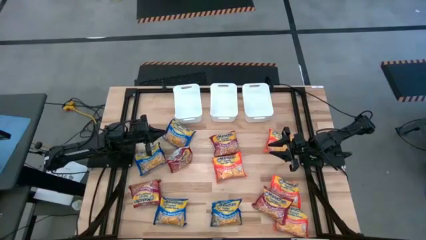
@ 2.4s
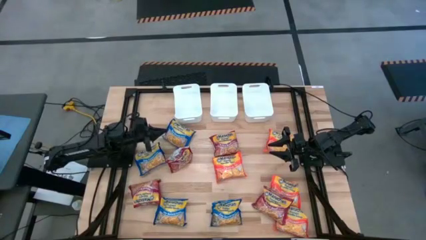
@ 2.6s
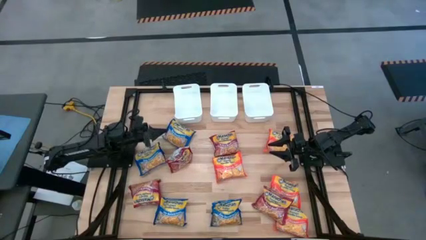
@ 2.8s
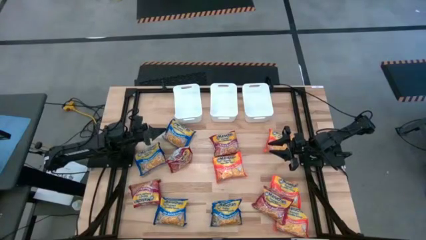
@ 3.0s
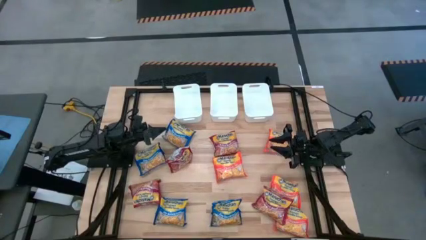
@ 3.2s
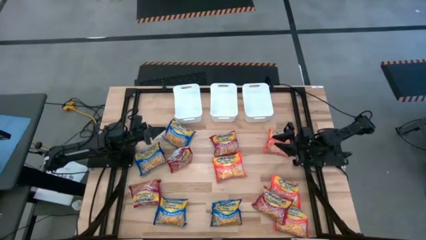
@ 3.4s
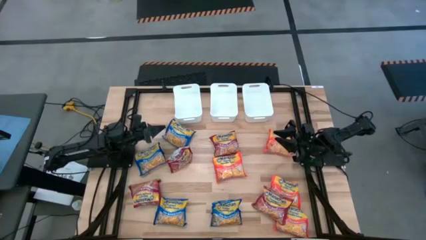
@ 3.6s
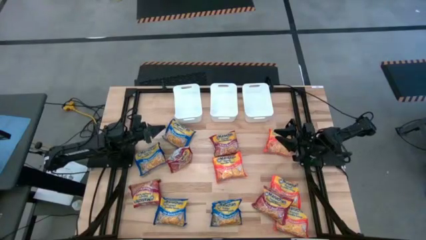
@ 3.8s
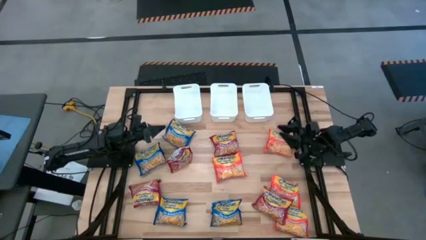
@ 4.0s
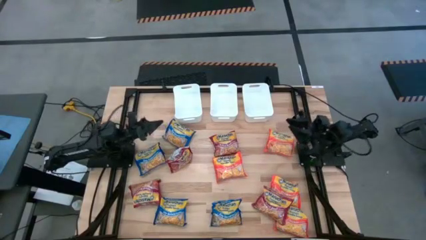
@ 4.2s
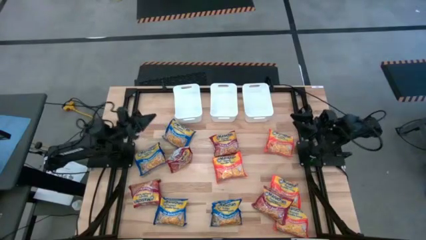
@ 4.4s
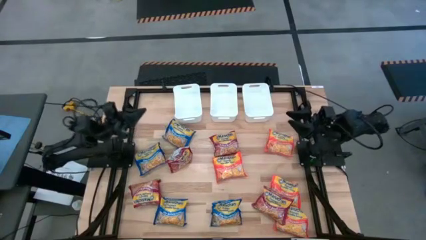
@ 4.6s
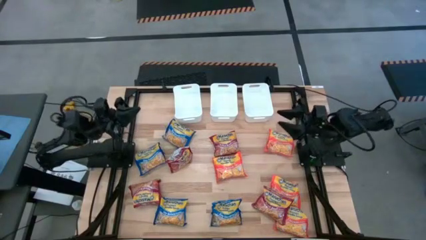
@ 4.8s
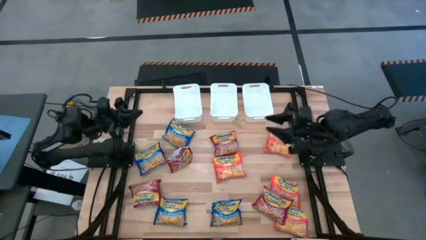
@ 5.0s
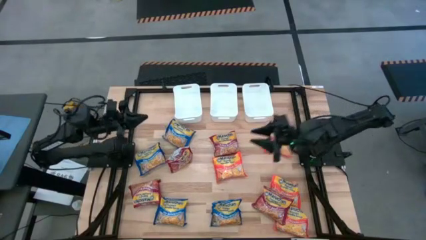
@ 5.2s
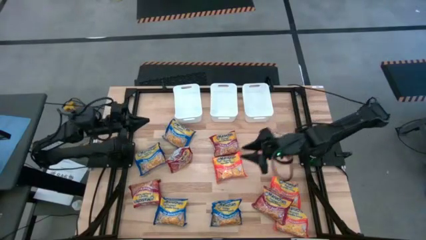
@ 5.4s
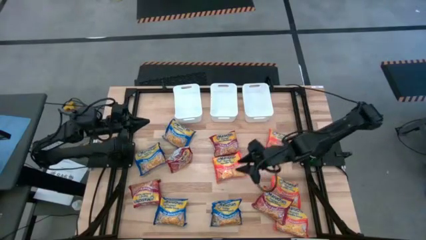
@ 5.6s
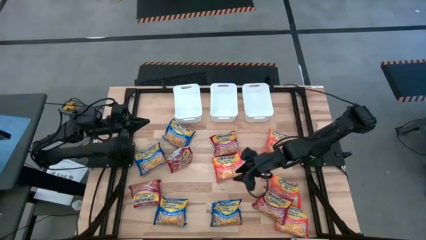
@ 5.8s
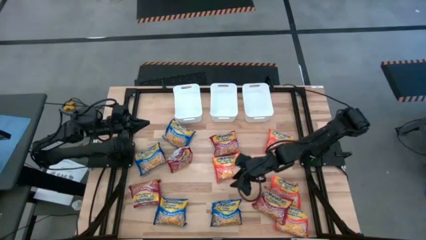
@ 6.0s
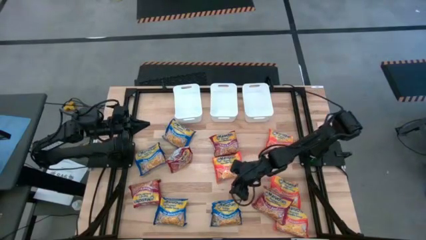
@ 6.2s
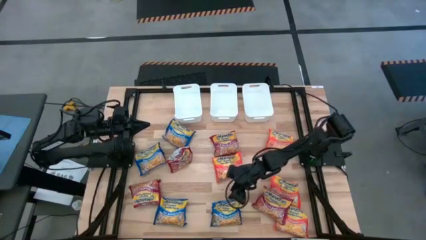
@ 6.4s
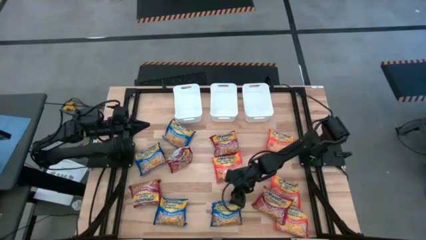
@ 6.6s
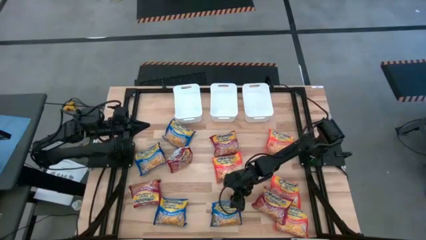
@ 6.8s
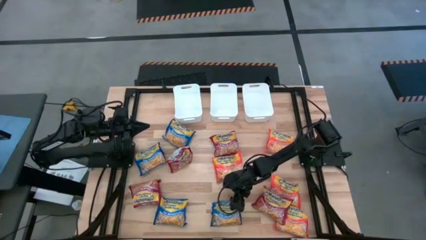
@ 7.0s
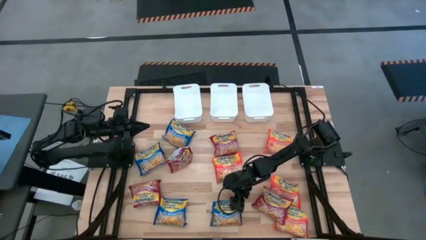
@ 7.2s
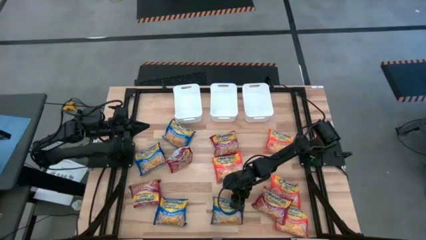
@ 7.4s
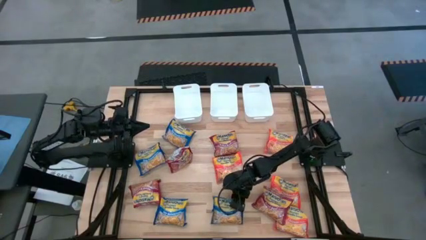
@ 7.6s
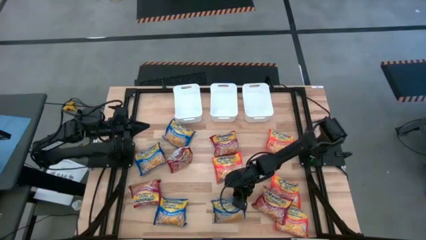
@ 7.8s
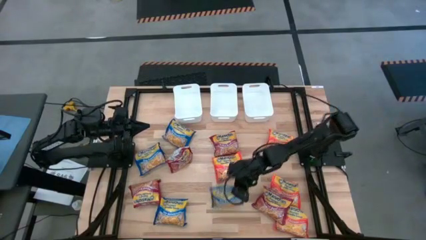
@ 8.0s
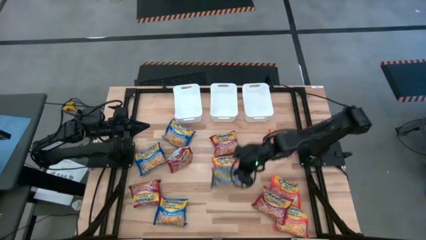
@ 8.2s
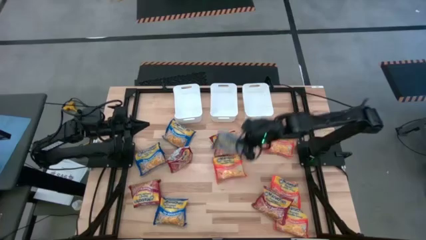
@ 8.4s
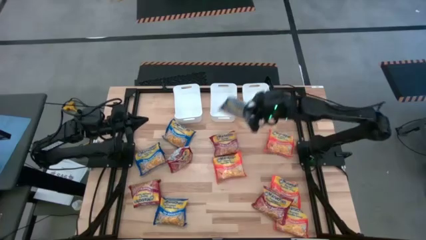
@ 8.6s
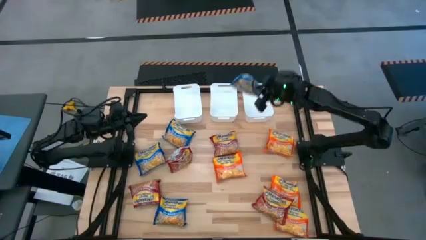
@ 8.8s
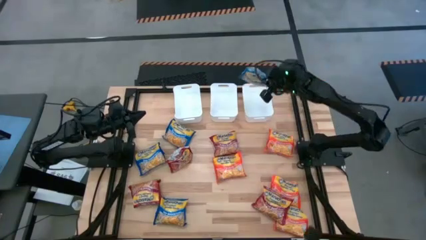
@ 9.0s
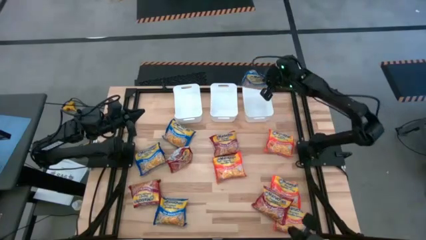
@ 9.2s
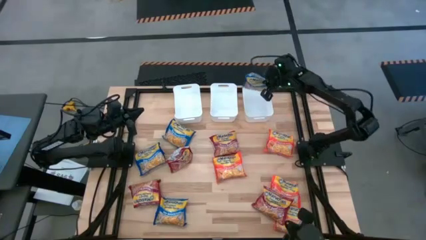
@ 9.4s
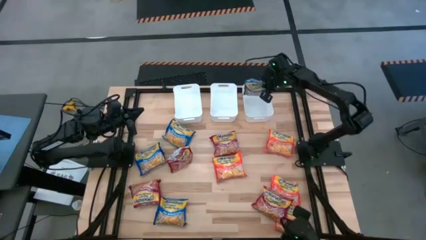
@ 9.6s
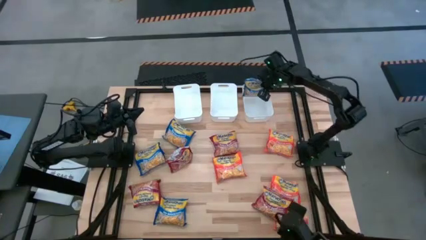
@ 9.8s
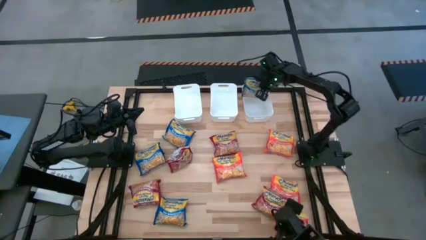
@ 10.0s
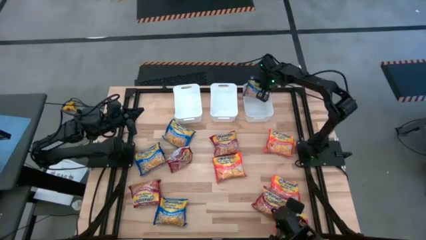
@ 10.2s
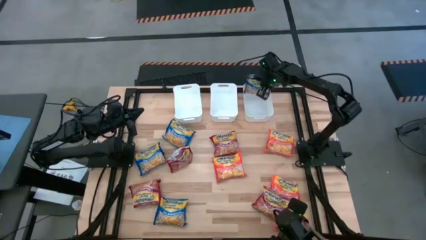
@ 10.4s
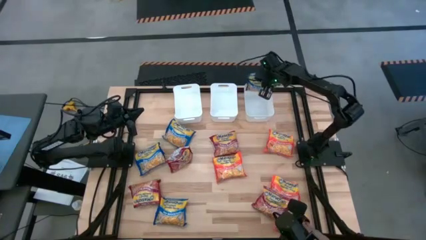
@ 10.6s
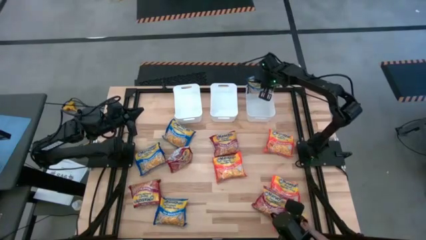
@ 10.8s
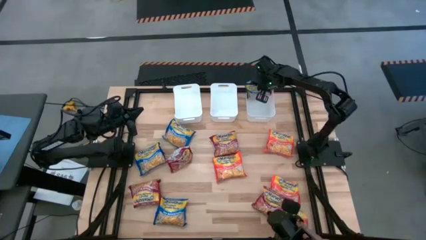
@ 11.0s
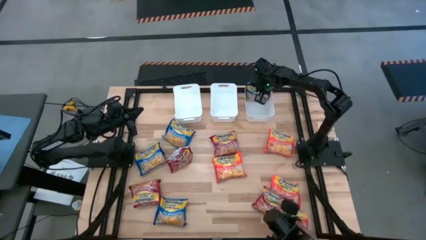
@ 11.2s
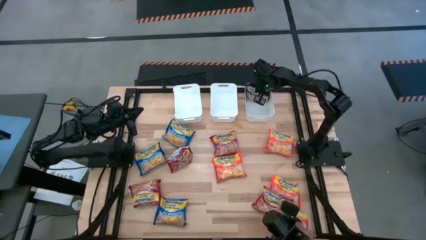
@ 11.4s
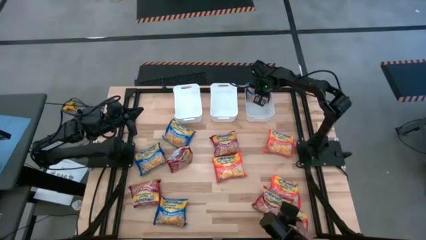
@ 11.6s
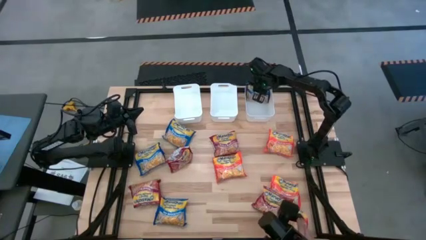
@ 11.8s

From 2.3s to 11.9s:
Task: Sort Maruchan noodles
Put the blue noodle pack into the right white bin

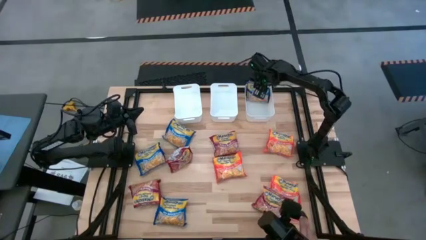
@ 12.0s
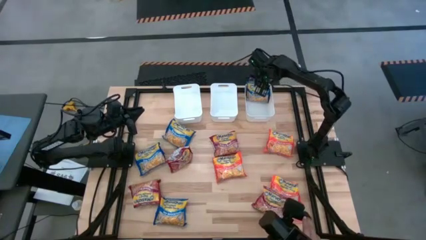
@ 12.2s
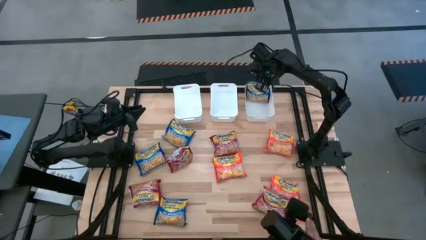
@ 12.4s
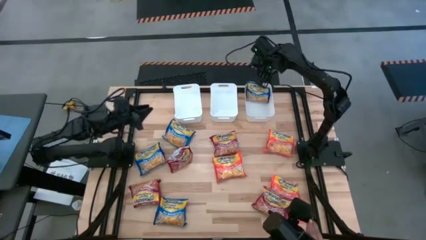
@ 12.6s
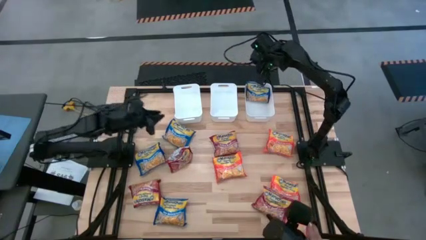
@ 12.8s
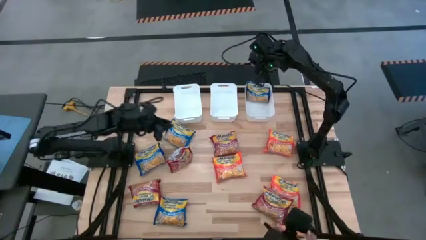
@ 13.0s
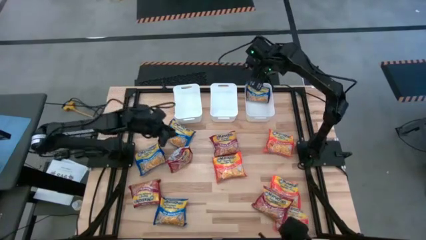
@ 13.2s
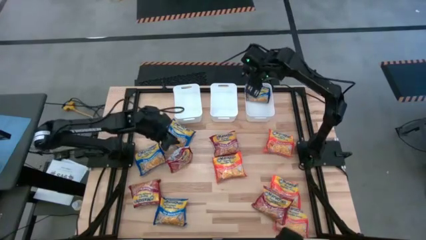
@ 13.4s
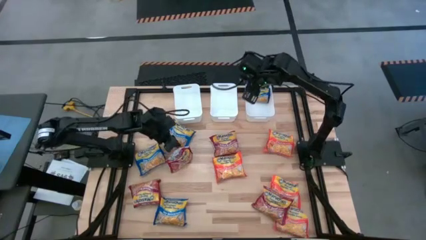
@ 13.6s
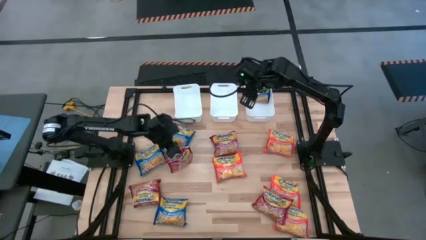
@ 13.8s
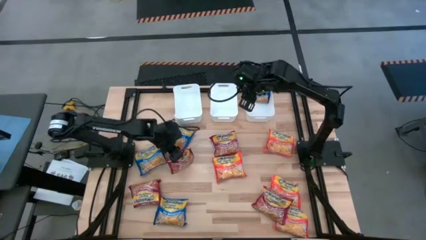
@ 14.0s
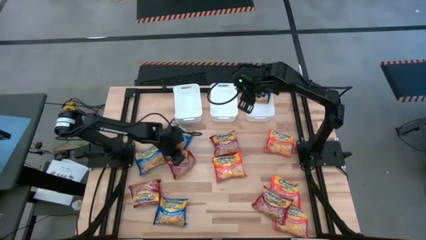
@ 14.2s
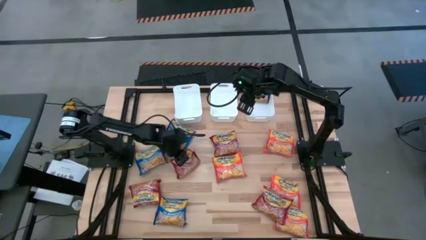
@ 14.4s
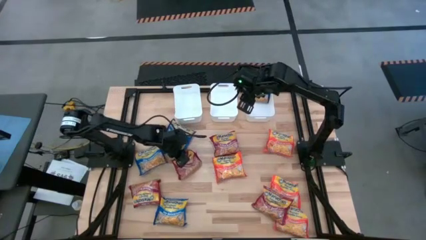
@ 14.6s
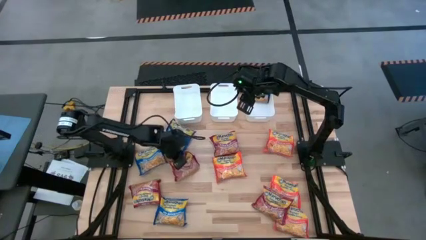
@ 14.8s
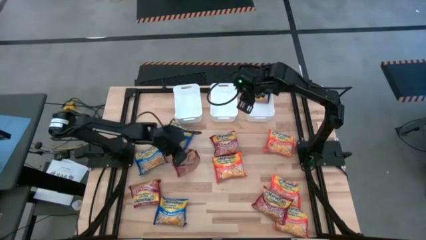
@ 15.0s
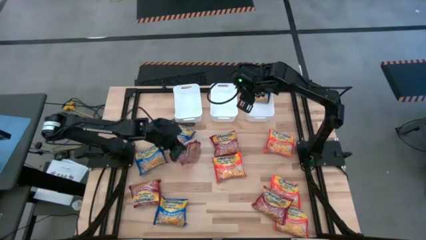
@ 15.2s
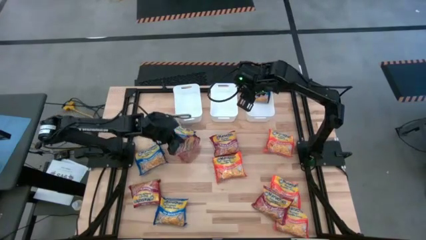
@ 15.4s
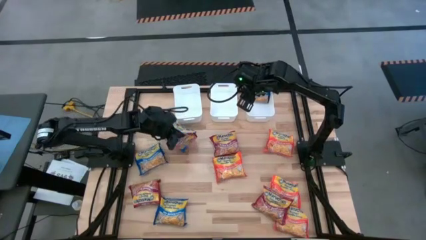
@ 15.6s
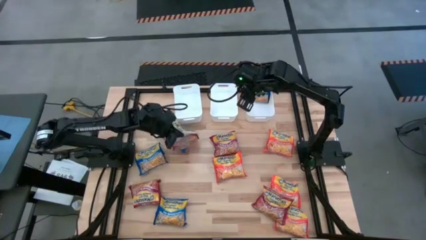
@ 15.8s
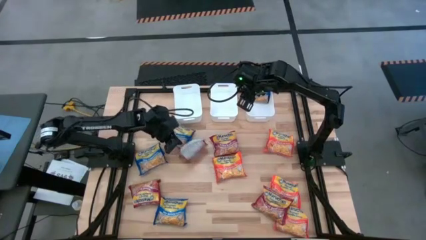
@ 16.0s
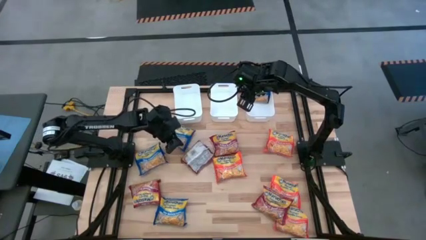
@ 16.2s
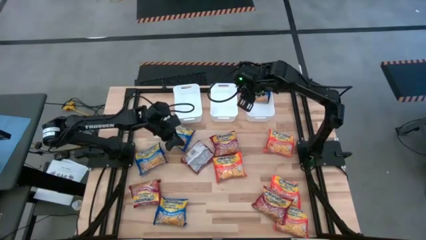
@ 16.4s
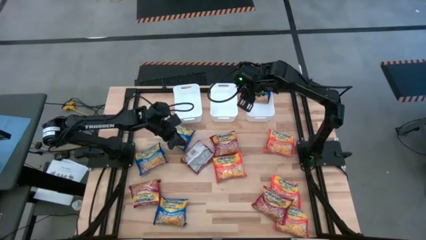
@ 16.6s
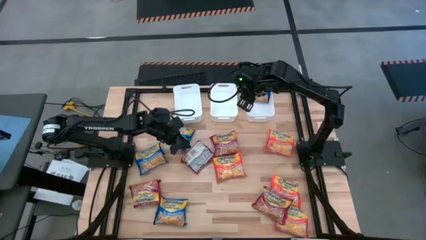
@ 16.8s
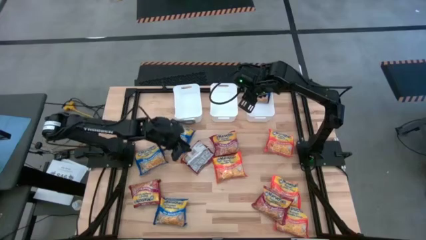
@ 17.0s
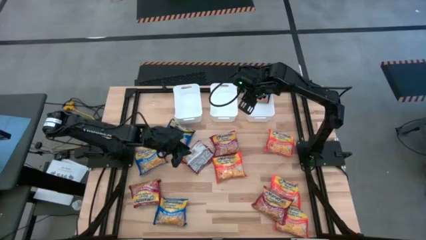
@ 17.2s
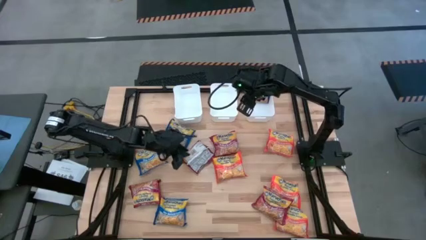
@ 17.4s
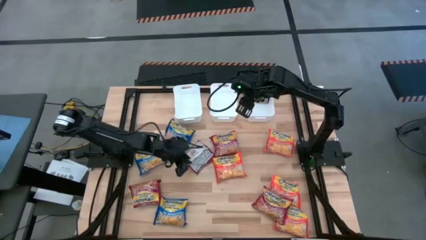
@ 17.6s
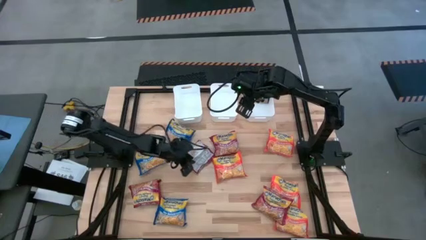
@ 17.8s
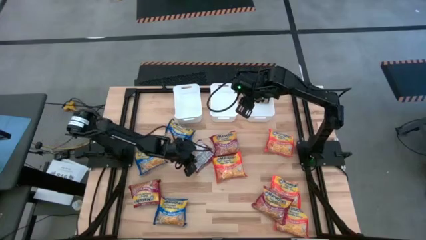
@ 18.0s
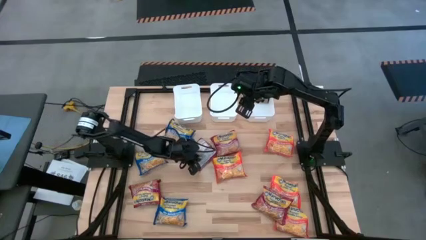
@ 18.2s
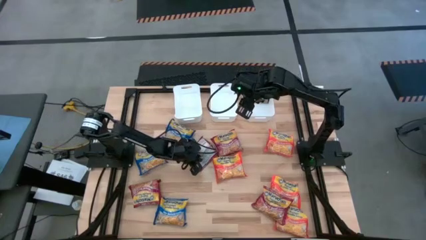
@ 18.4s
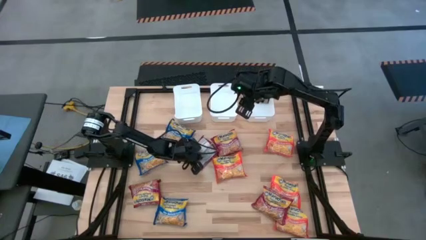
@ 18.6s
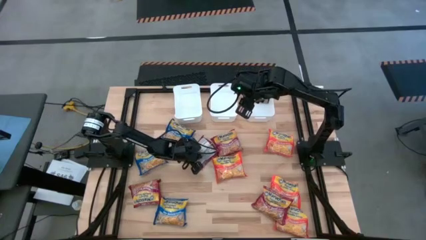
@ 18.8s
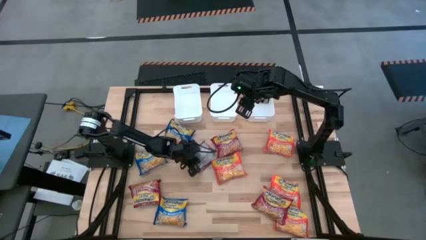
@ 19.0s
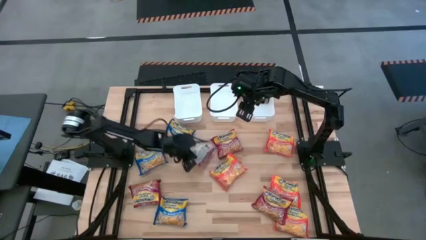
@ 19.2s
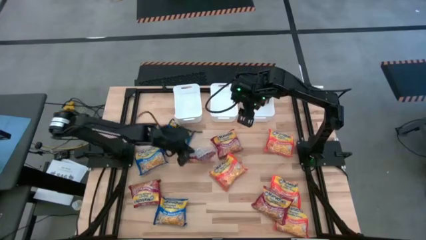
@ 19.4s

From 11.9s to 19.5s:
Put the red noodle pack into the middle white bin
